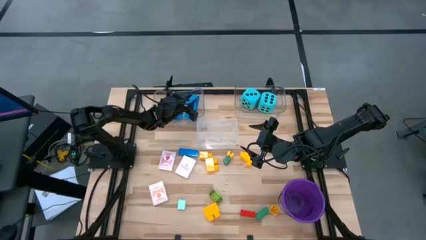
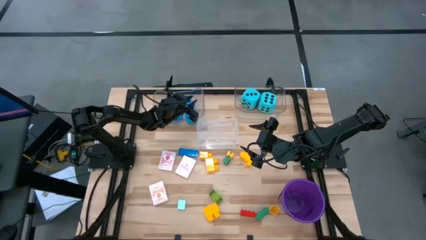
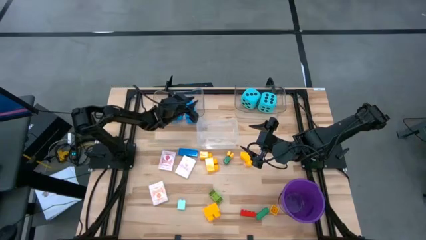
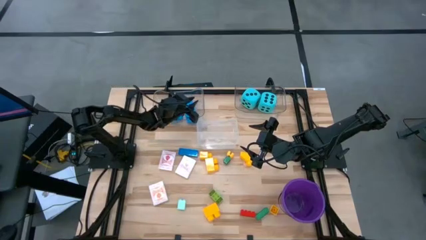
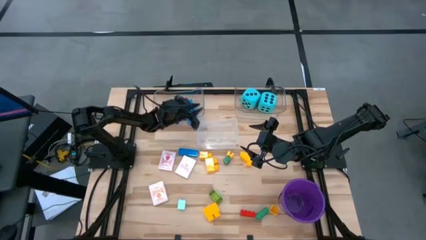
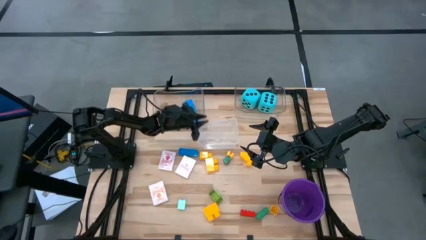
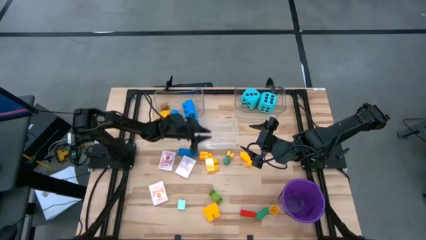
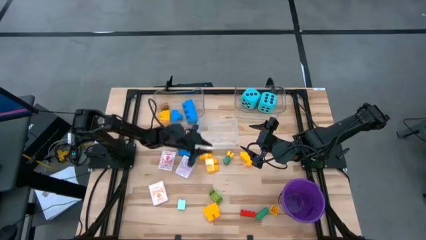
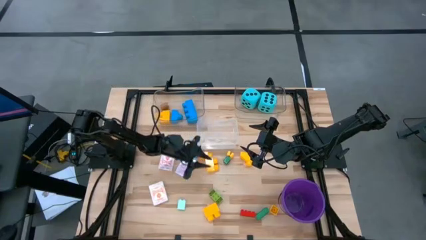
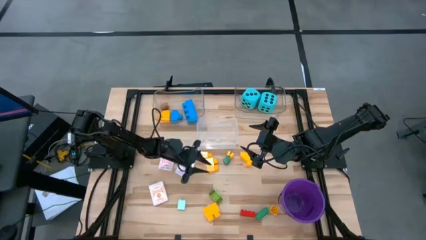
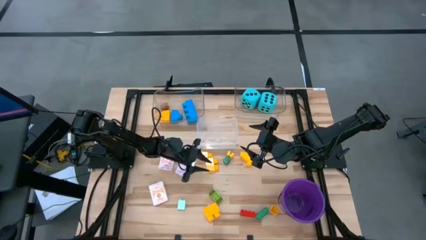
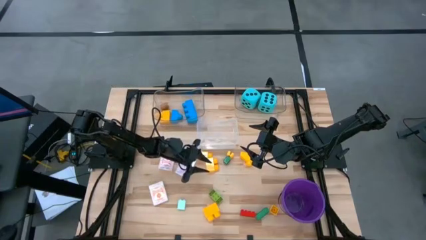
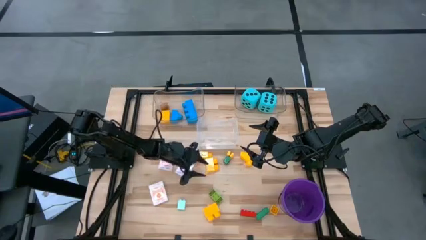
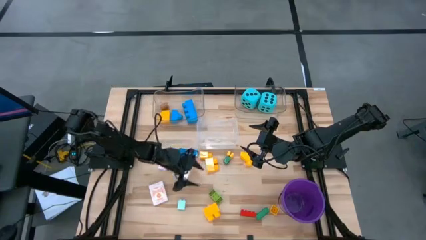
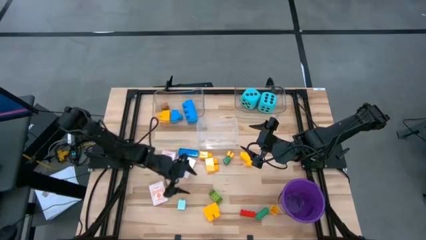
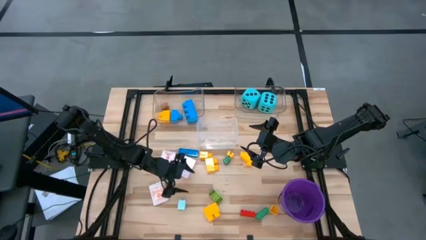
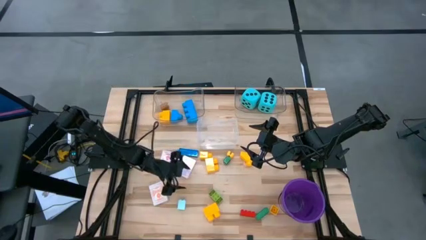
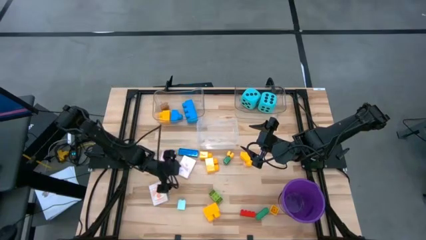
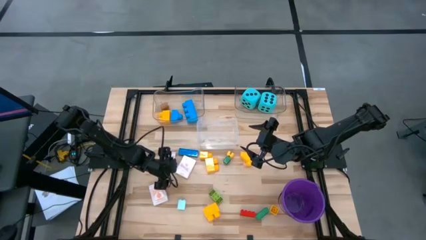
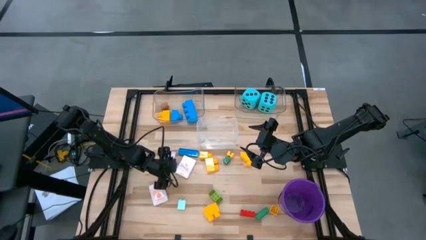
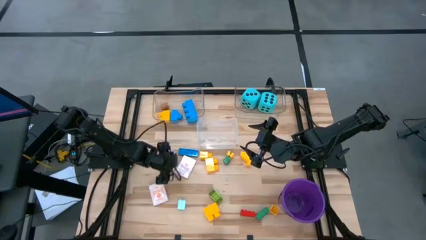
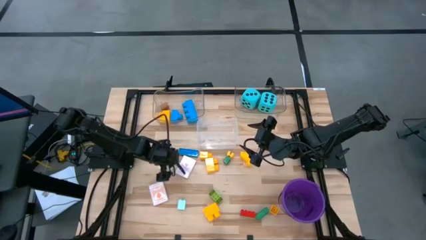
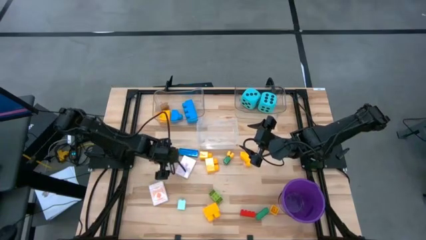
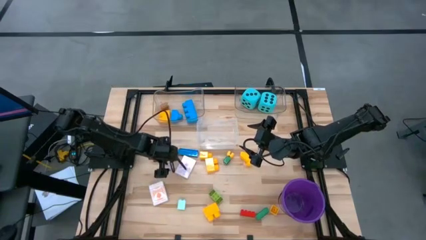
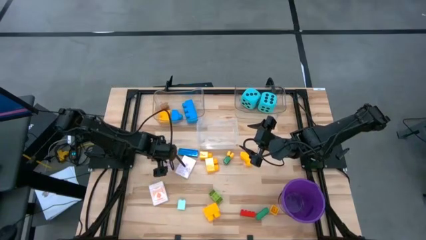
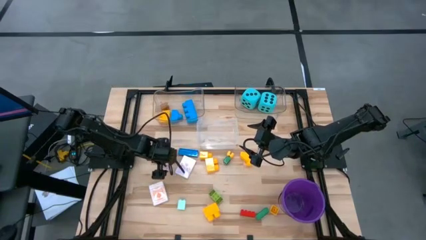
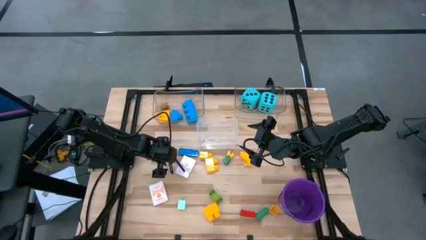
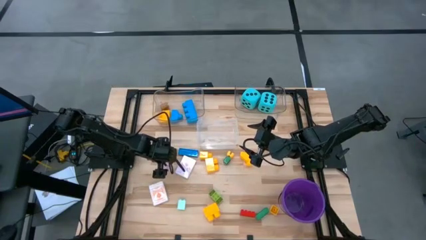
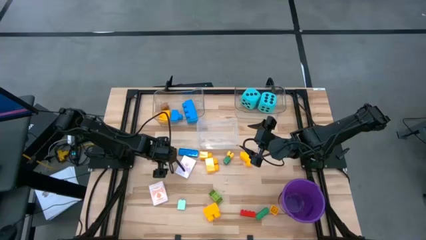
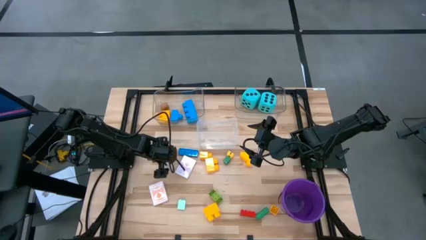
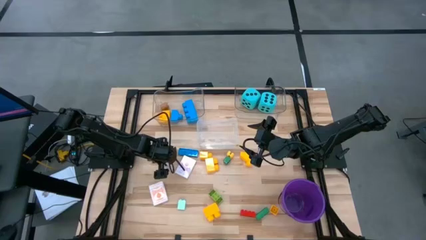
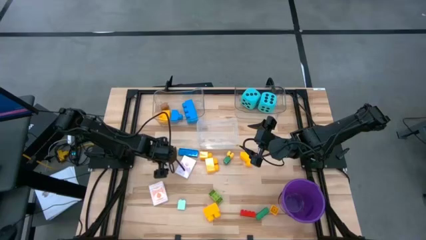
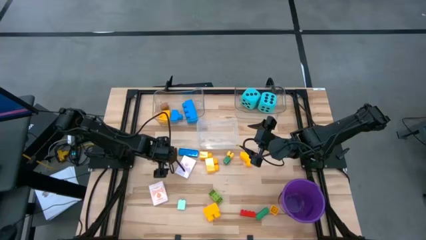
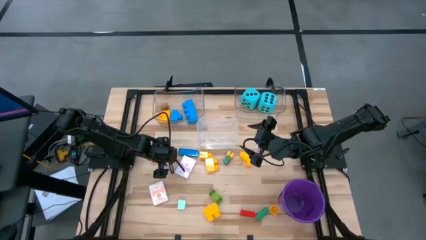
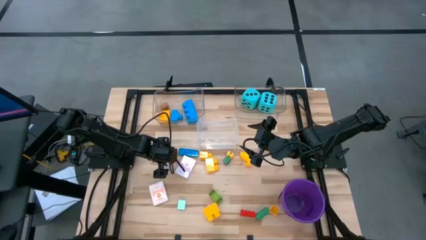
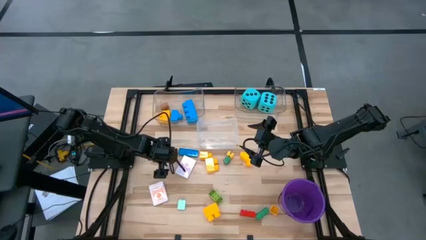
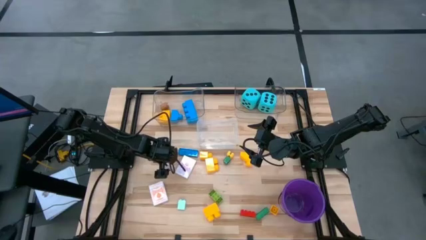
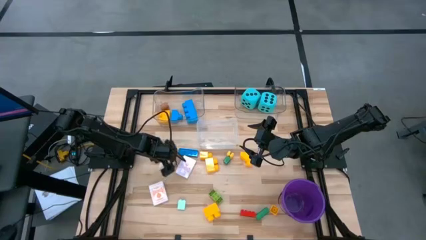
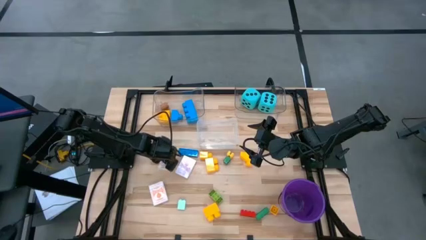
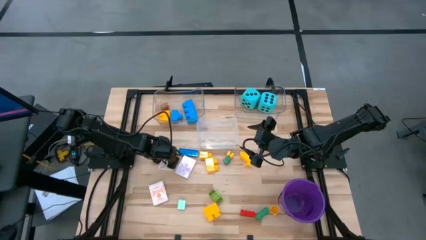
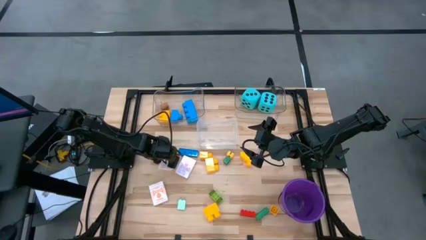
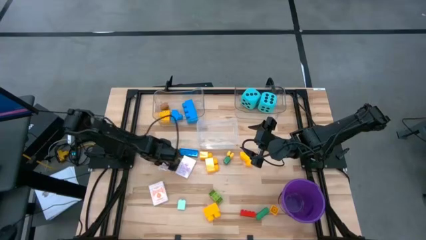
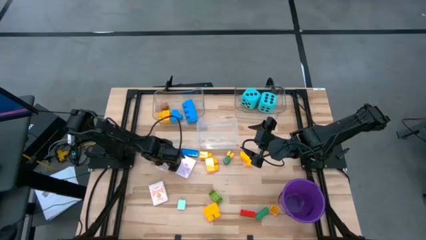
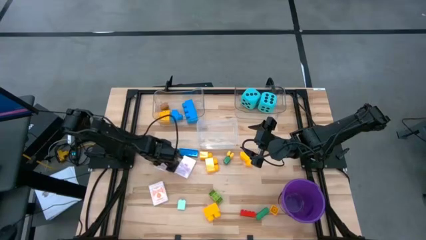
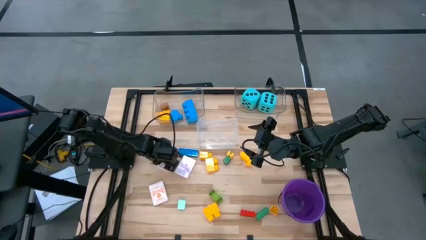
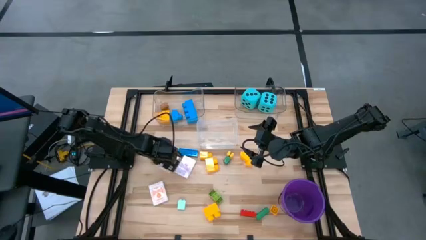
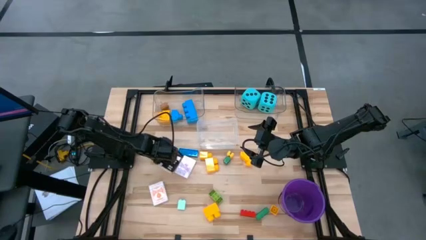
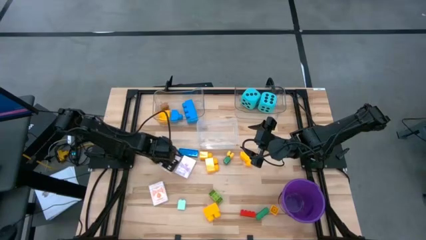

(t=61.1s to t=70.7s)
Task: Pick & Place Toys
Put the red deck of cards into the bottom transparent bin

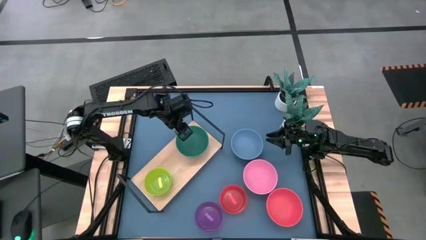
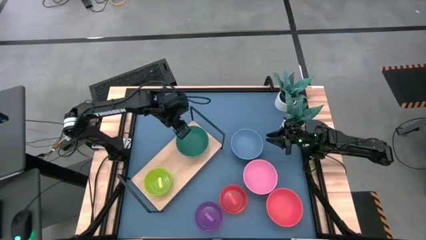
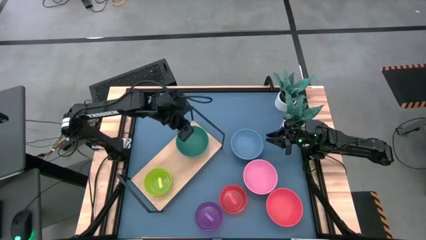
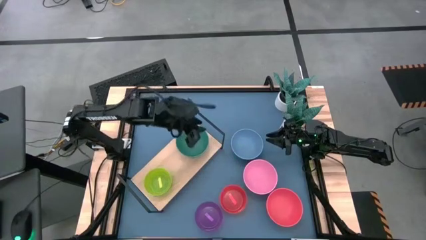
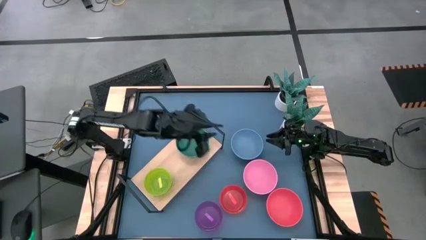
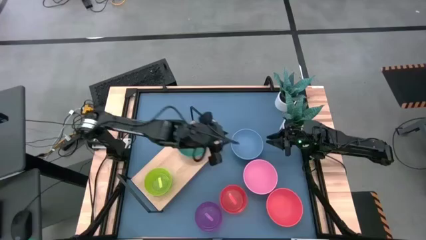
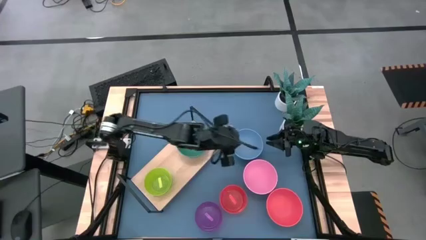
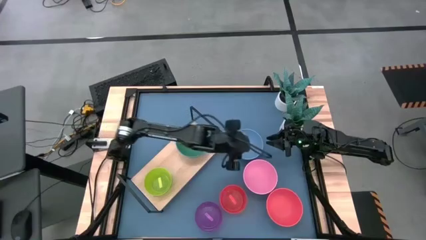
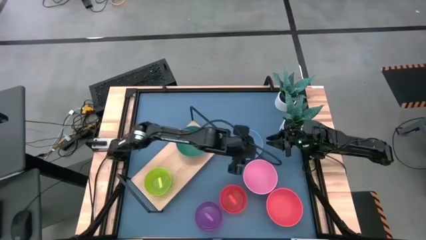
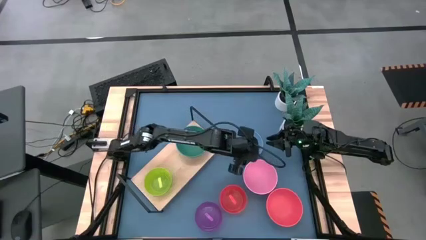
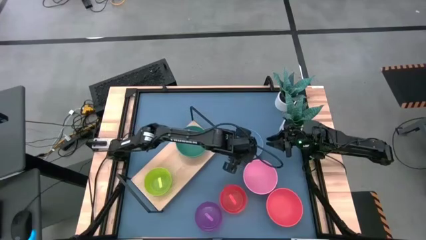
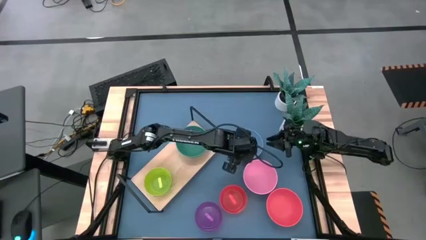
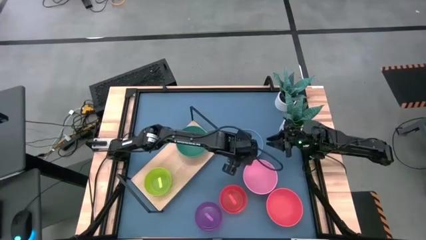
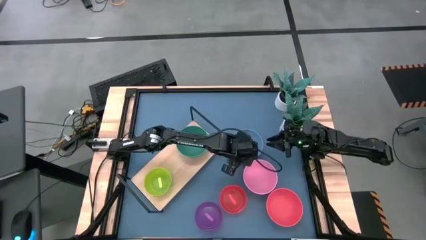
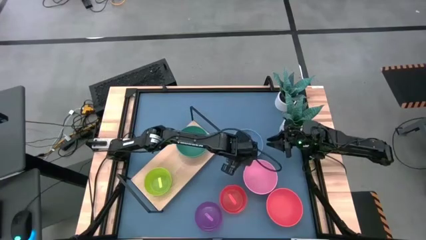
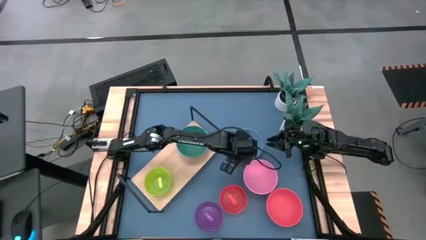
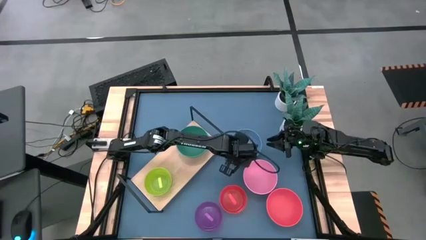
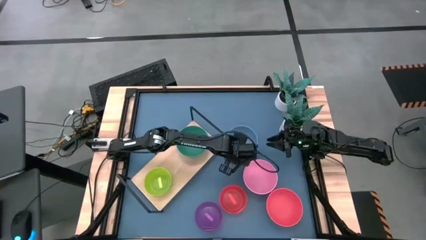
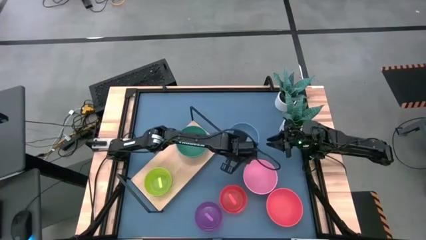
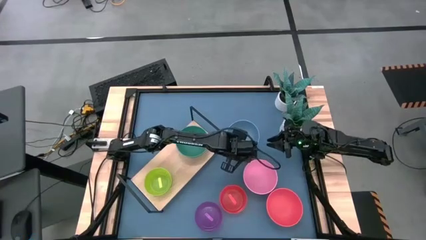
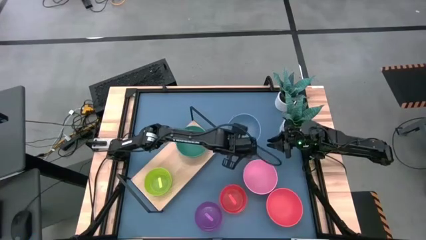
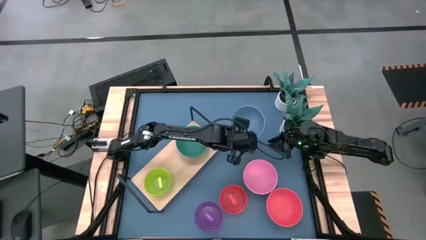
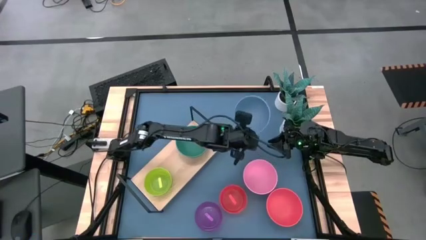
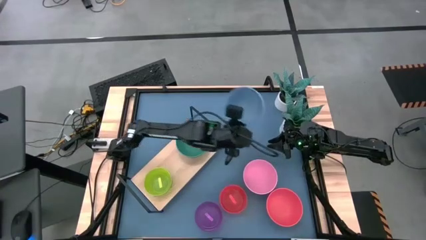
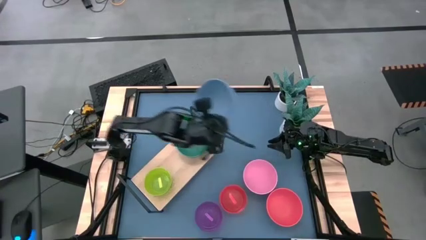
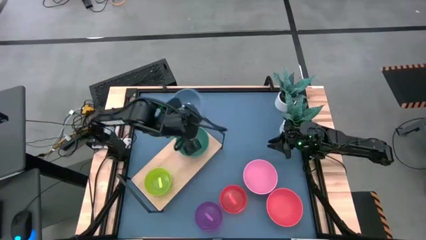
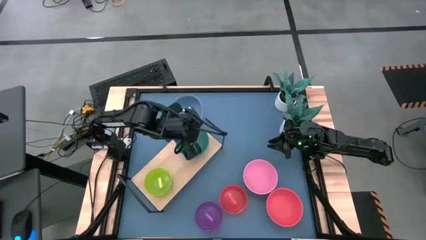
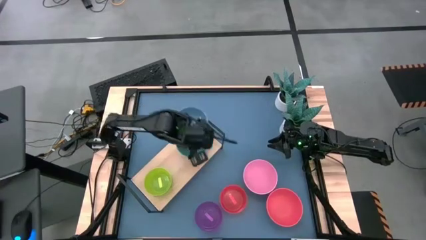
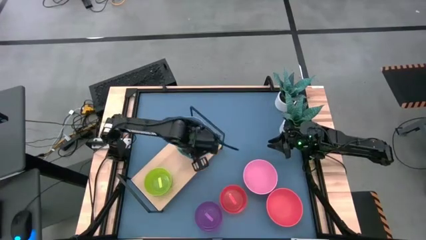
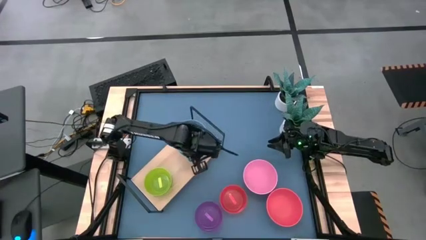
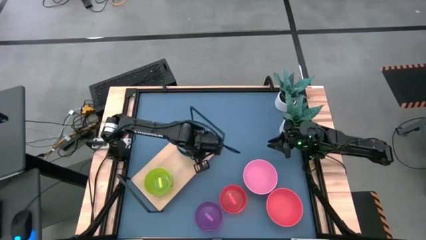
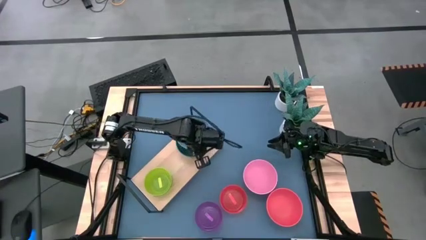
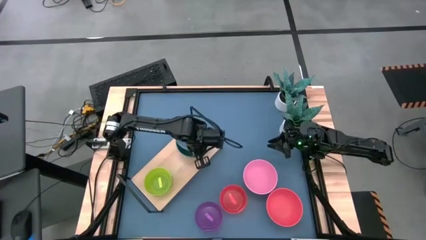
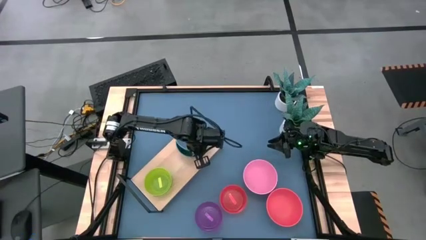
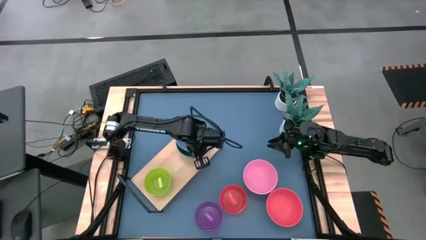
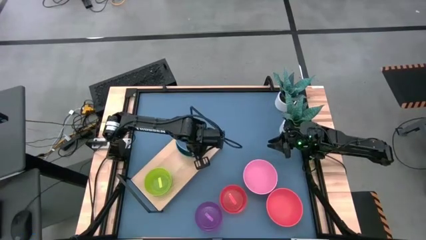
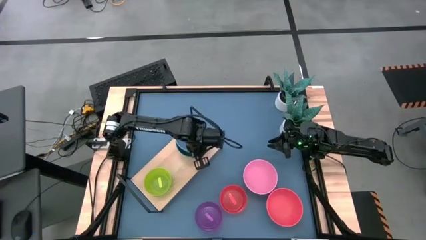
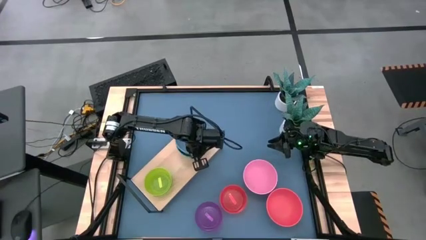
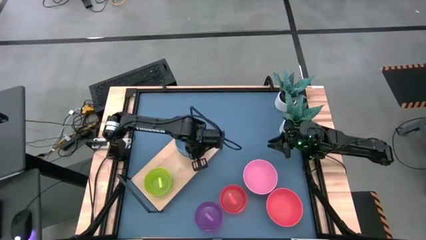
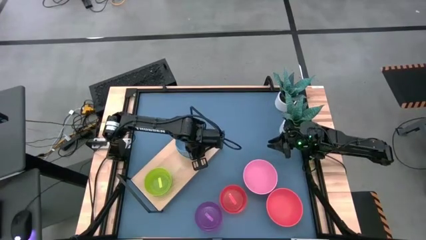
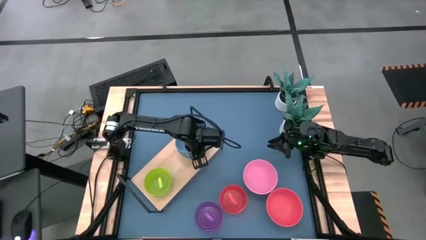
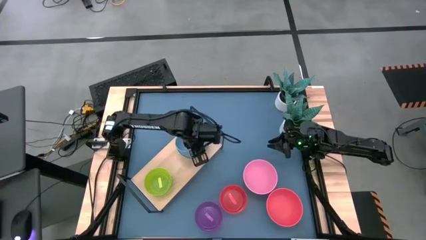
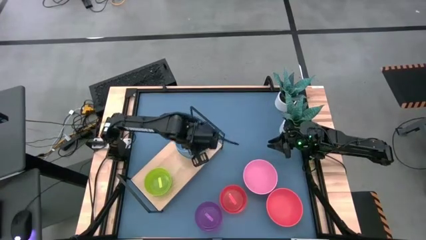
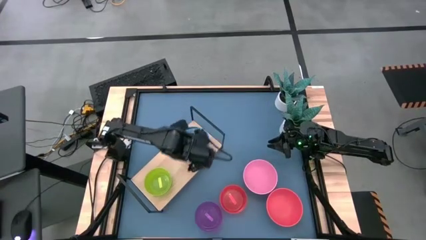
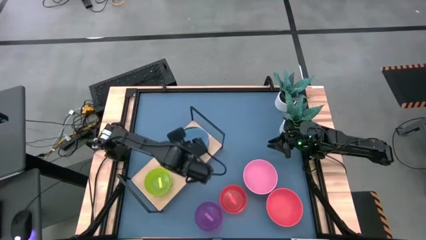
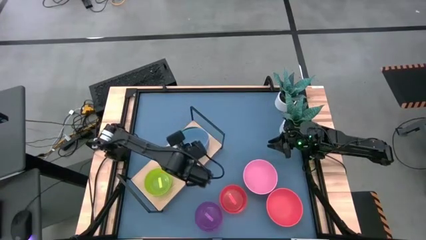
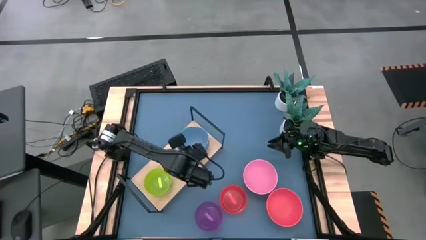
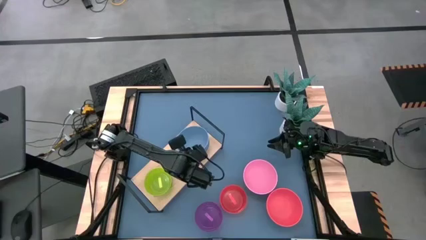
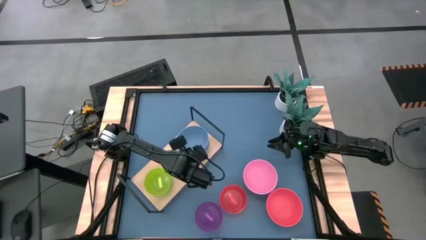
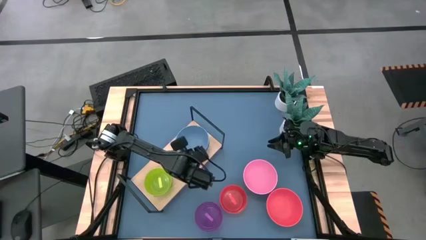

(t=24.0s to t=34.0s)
Task: Place and stack bowls onto a shelf
Stack the blue bowl on top of the large green bowl on the shelf
